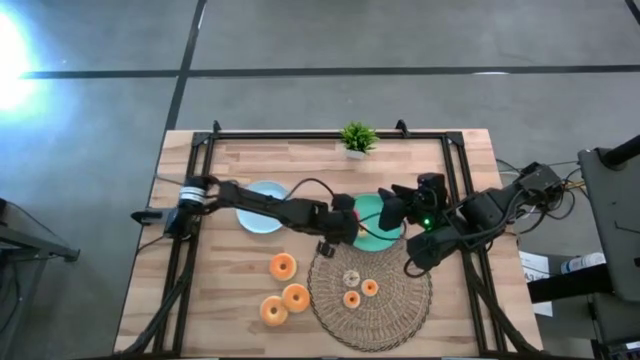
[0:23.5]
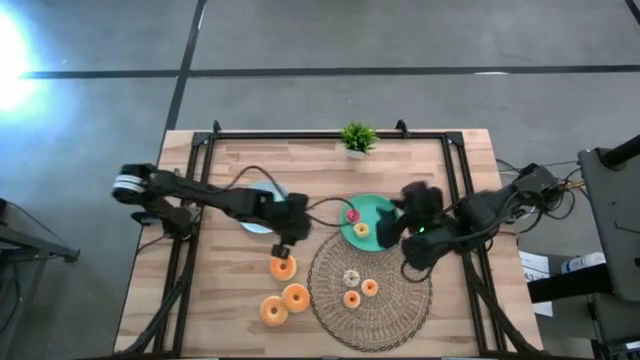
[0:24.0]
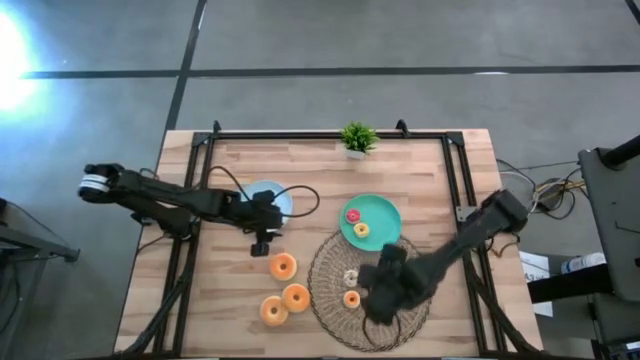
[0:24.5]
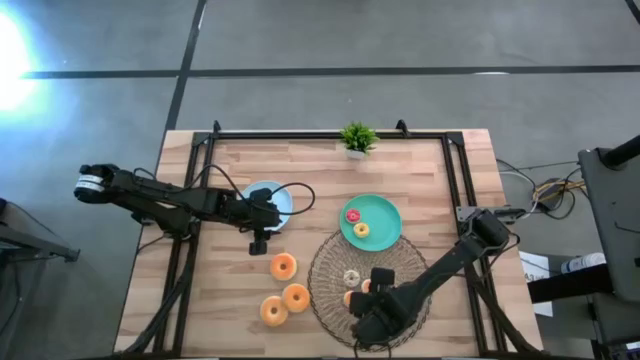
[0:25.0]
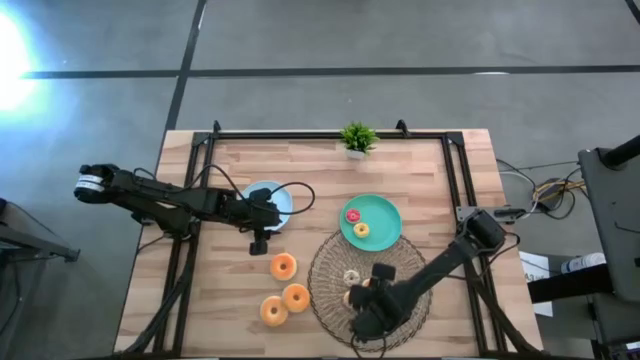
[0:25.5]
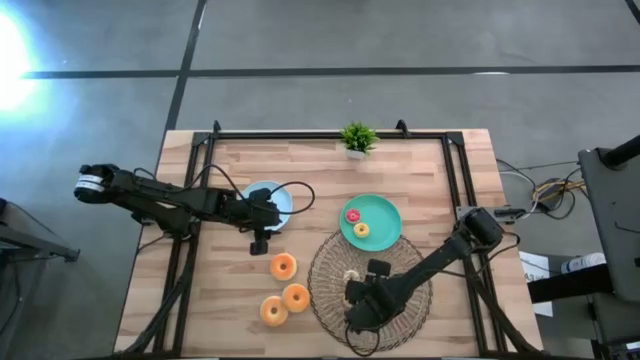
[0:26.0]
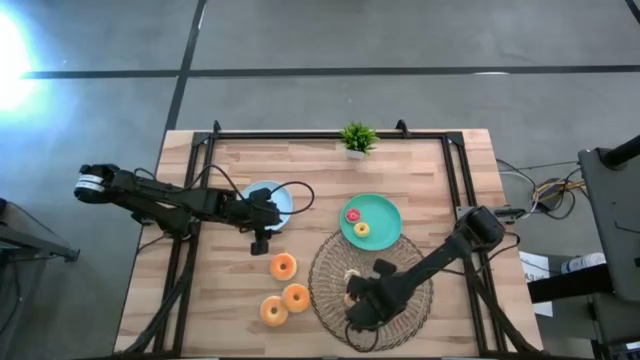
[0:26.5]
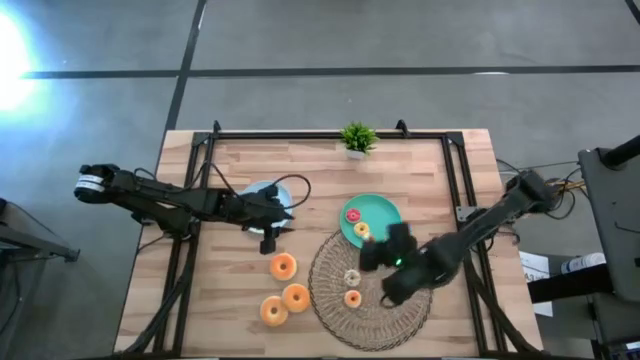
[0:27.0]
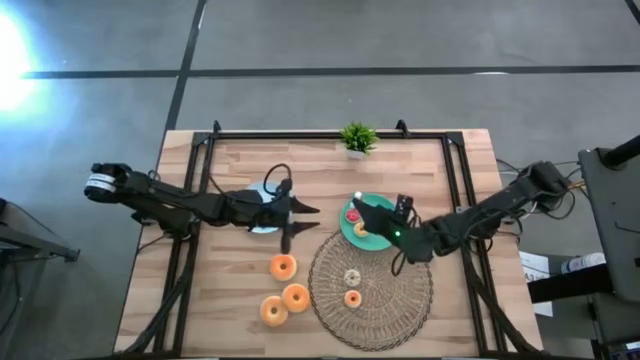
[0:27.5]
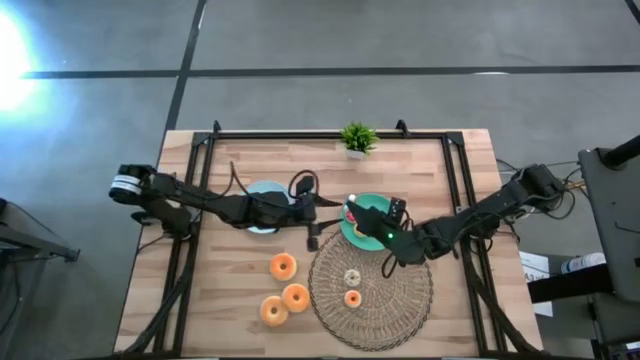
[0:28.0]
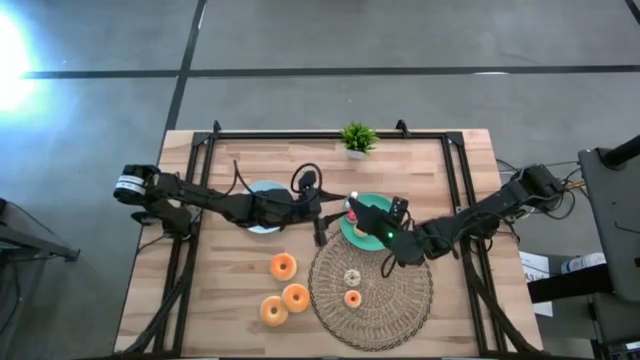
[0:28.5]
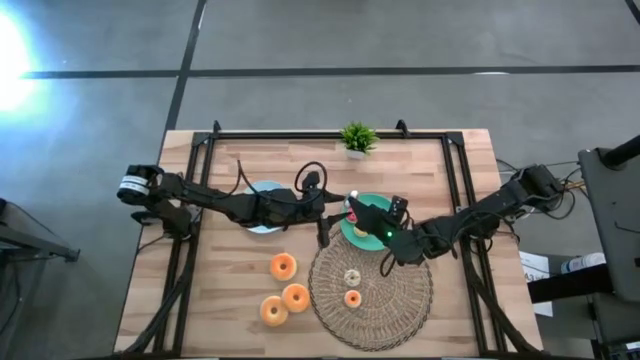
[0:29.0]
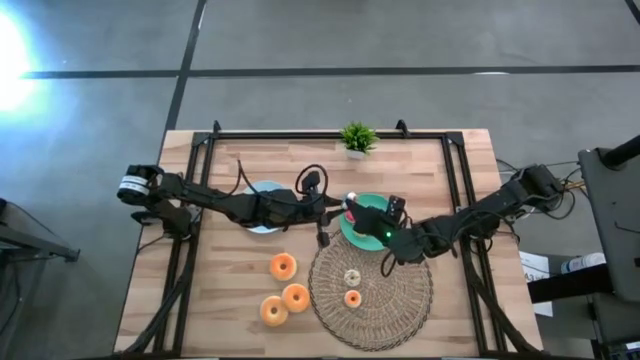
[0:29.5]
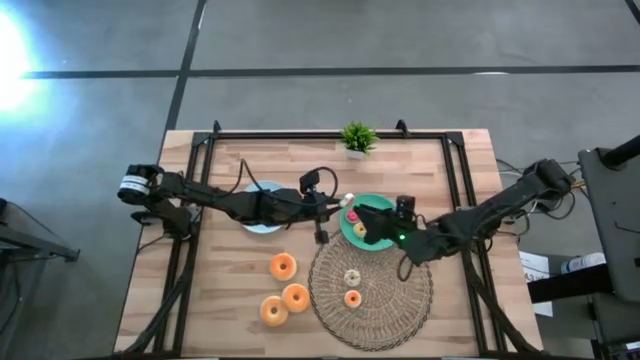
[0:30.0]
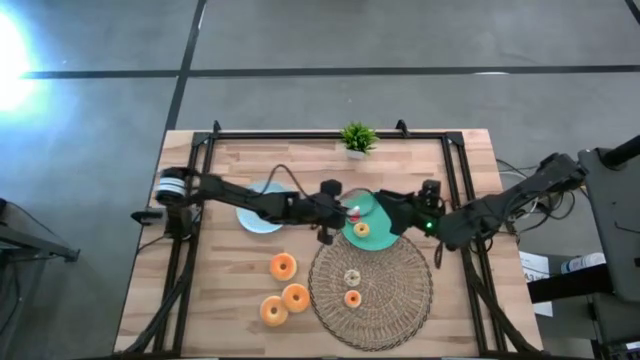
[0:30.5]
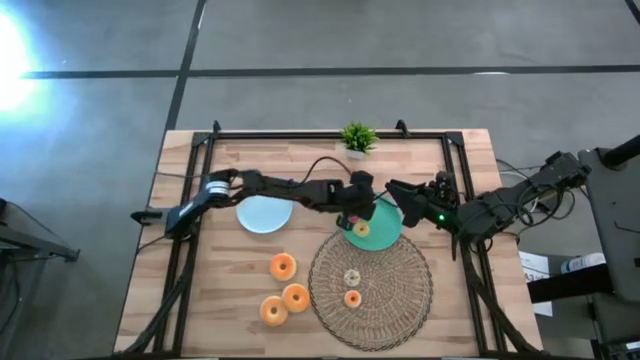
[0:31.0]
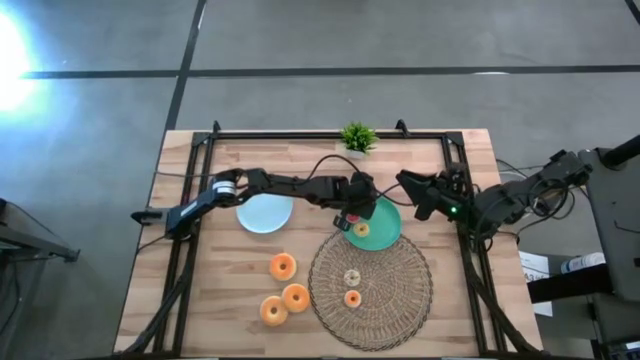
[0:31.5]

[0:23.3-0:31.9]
Task: Pick & Place donuts
Put the small blue donut on the green plate

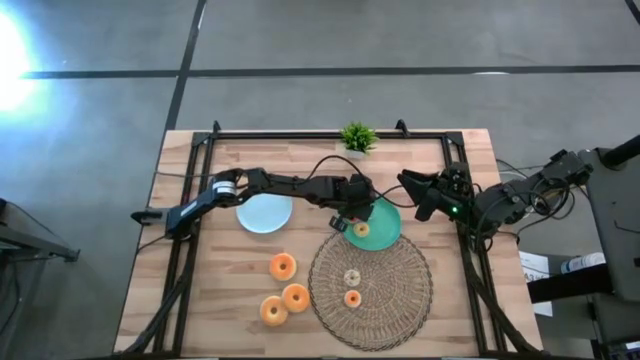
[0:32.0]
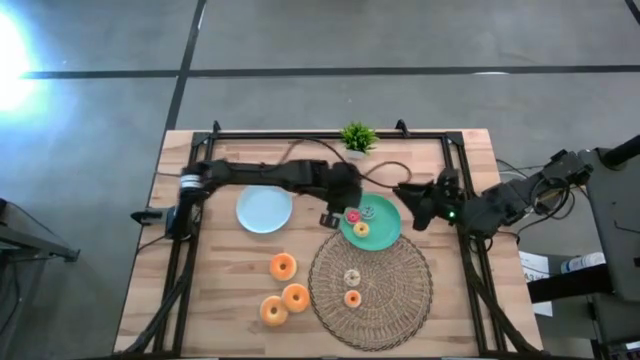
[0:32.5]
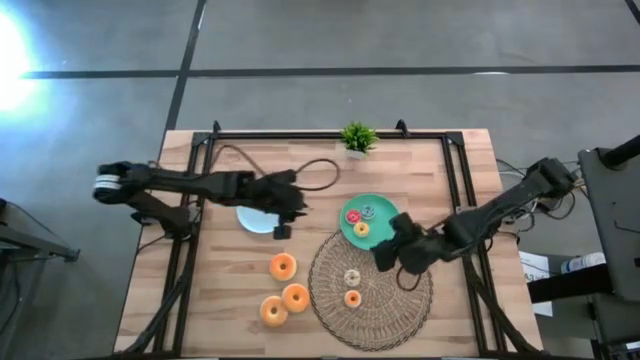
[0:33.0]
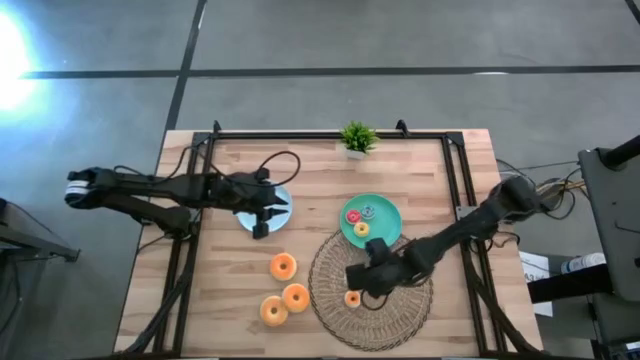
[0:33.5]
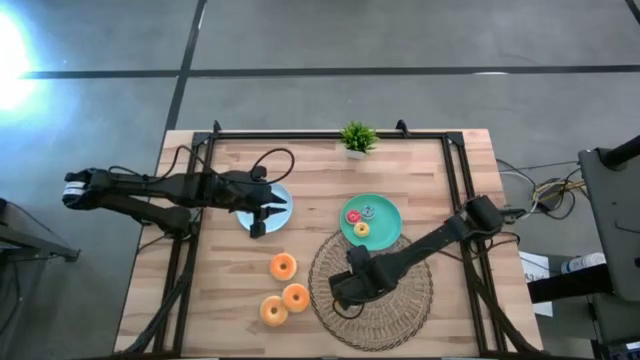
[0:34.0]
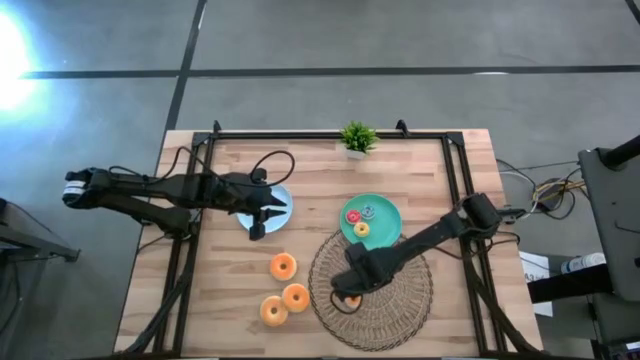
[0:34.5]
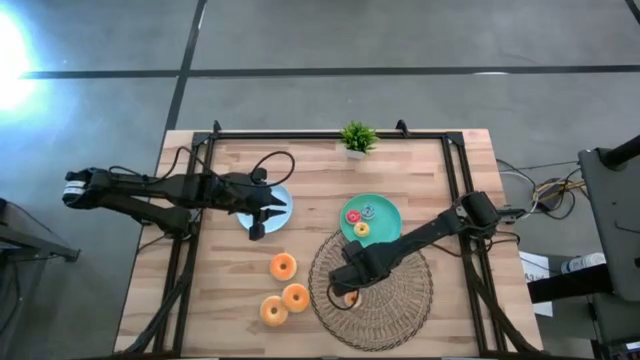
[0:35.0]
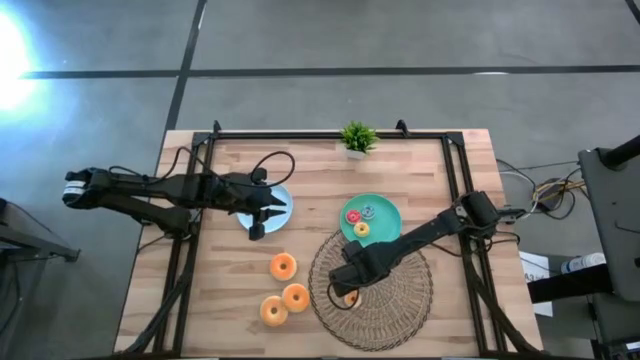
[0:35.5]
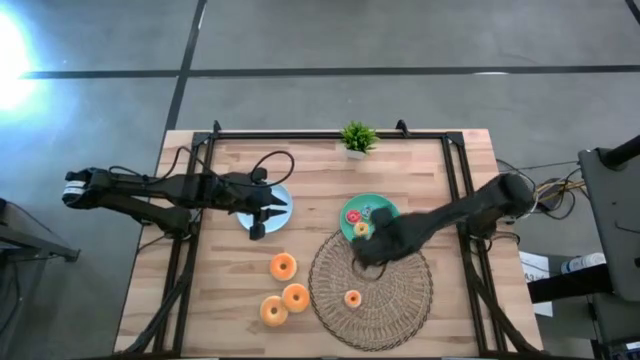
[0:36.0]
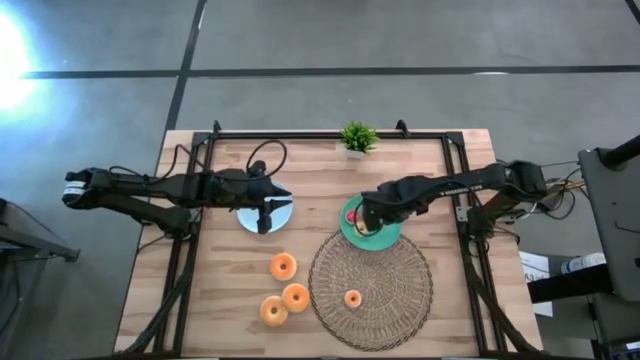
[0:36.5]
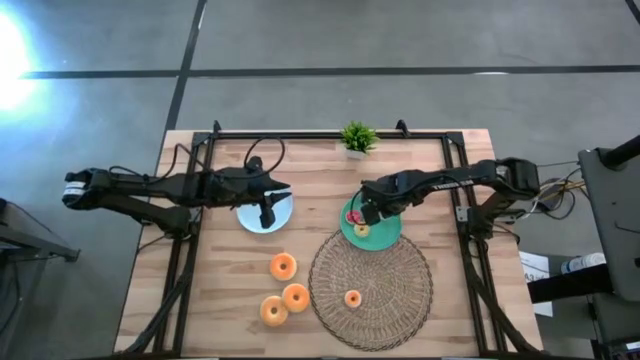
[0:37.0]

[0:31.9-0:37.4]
Put the small white donut on the green plate

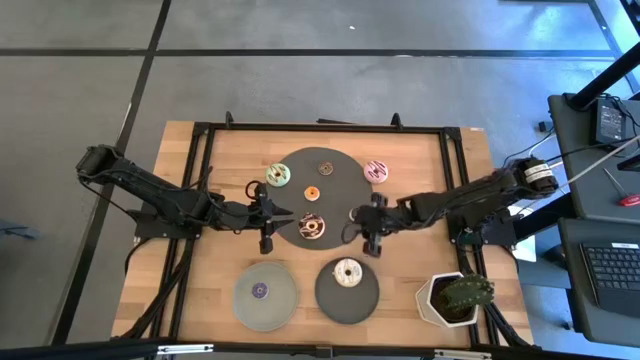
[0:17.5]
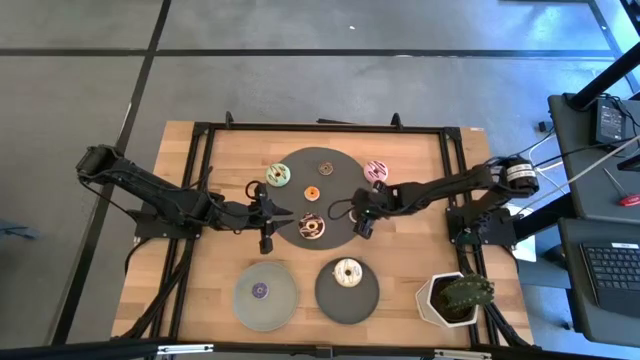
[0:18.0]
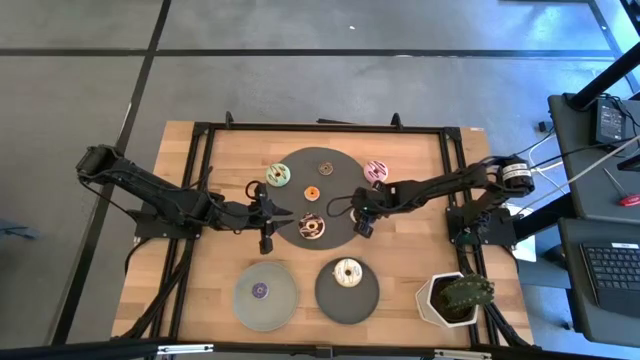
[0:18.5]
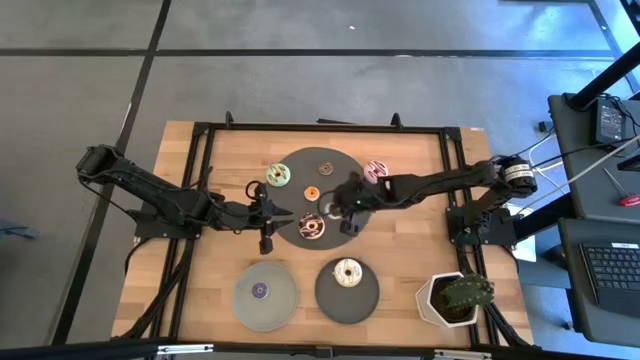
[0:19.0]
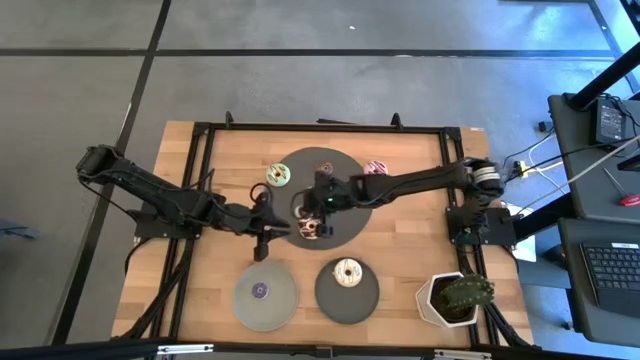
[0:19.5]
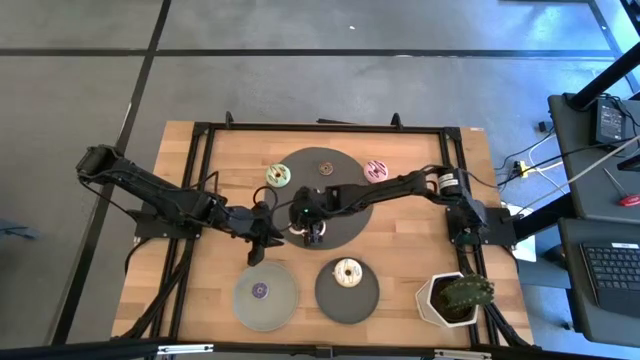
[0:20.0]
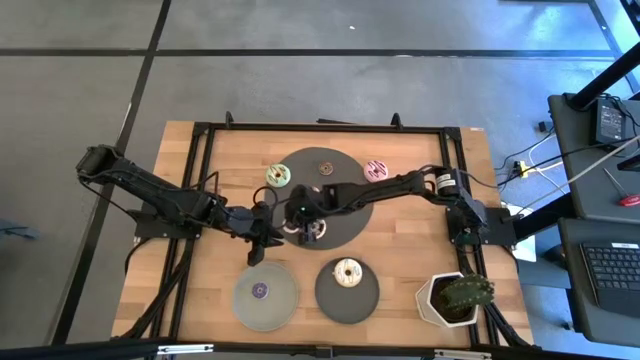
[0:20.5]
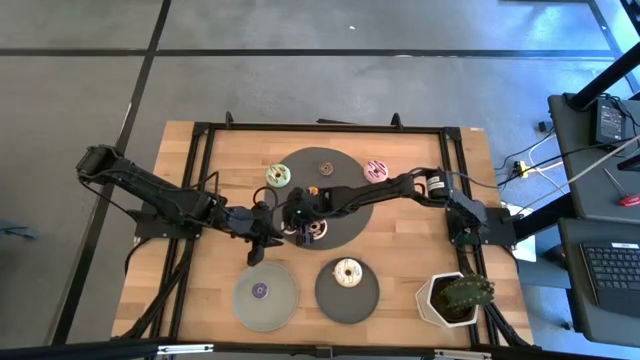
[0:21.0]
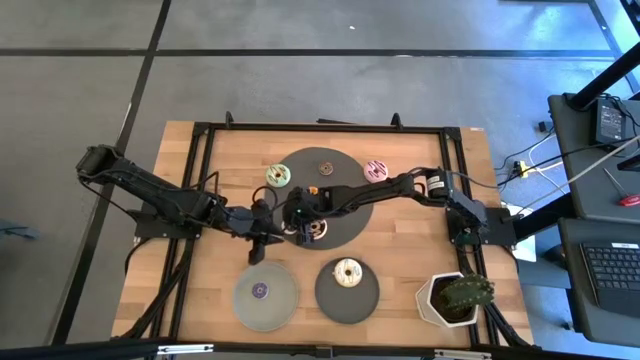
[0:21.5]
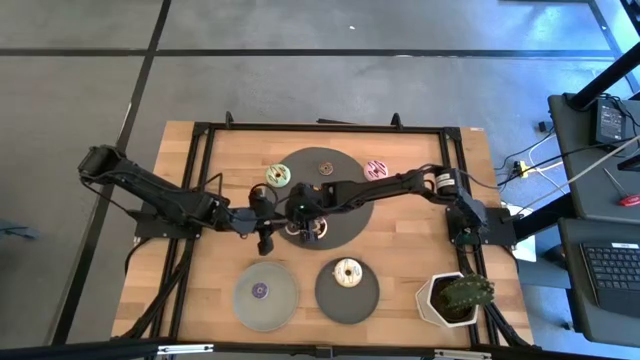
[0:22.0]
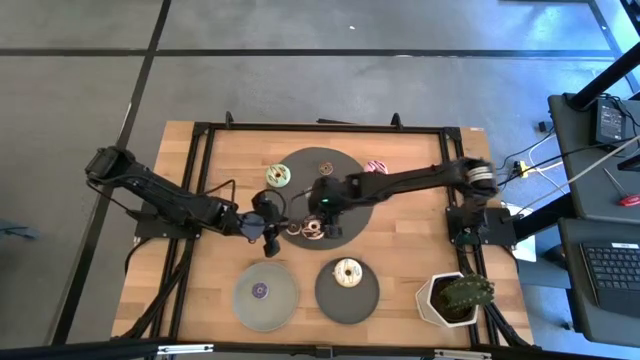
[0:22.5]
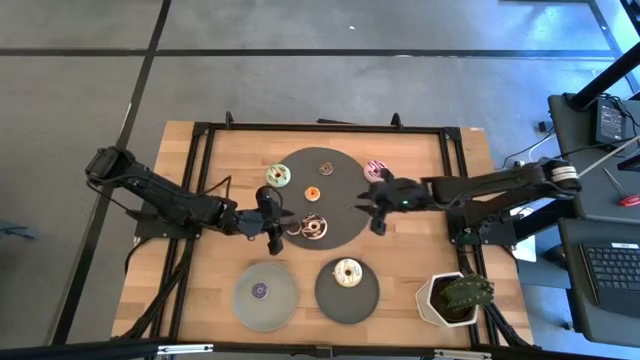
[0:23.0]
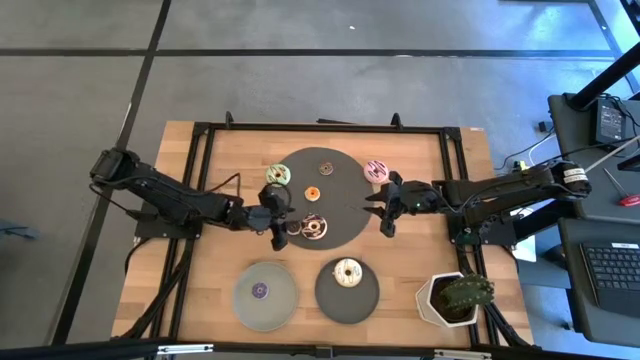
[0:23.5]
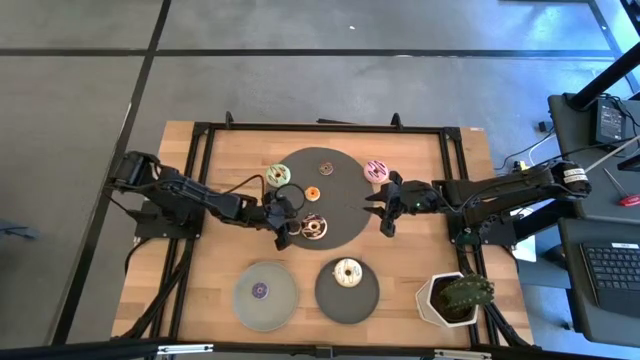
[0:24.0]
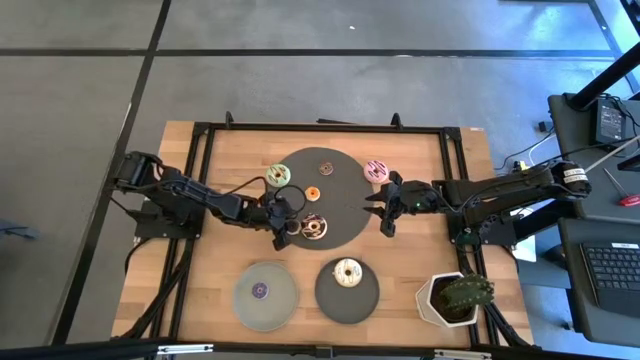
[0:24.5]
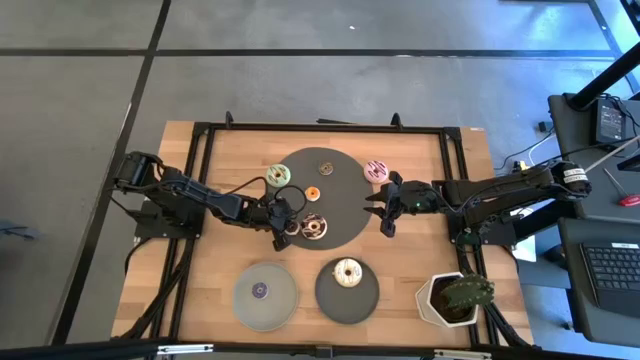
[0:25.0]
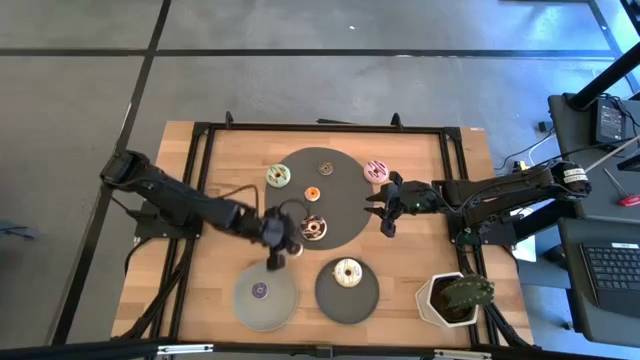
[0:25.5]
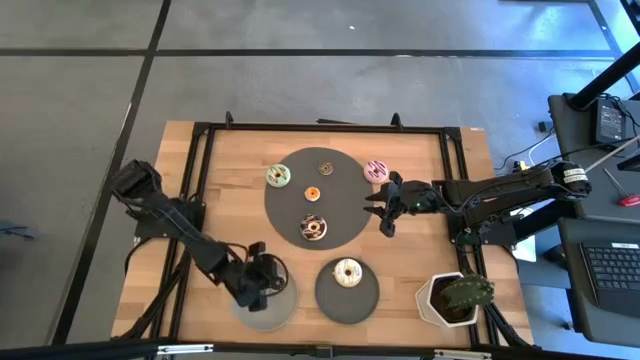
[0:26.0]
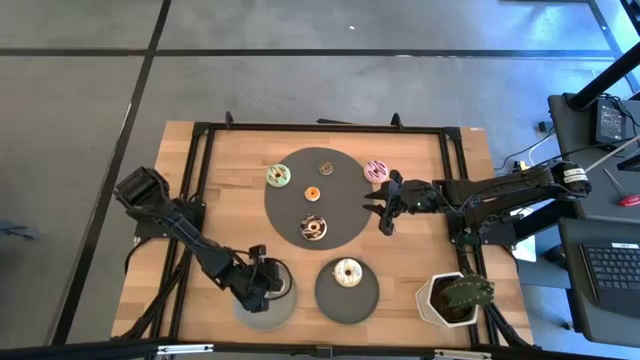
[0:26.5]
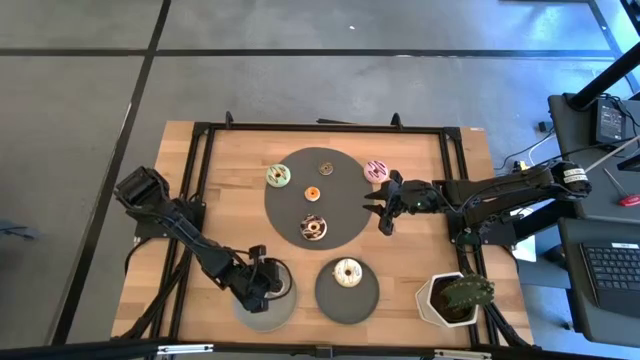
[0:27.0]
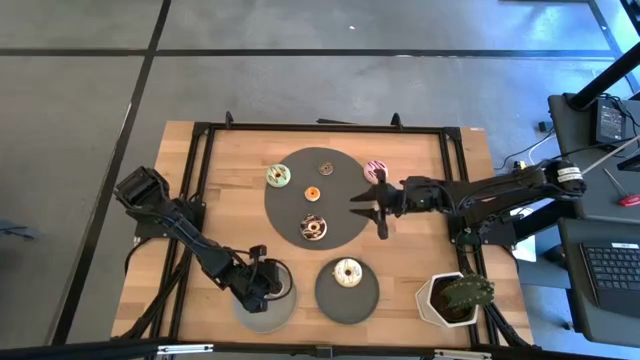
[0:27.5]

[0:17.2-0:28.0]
Task: Pick & Place donuts
Put the small black donut on the gray plate
